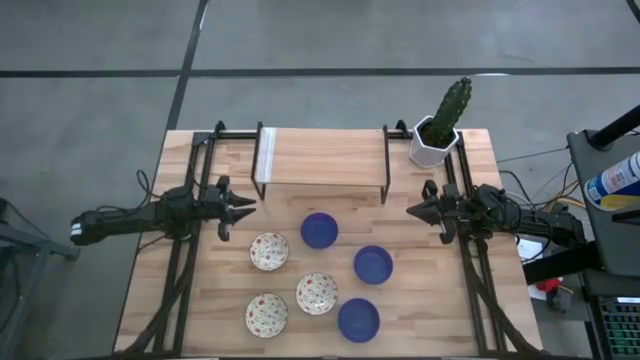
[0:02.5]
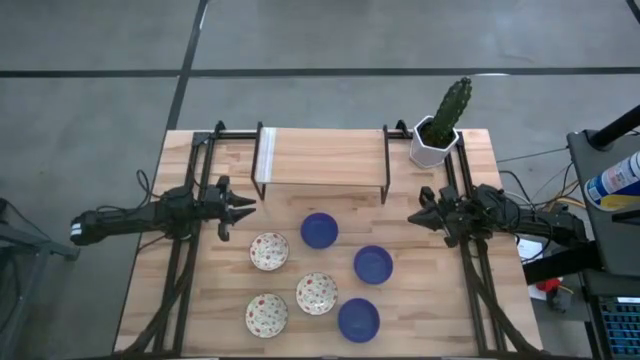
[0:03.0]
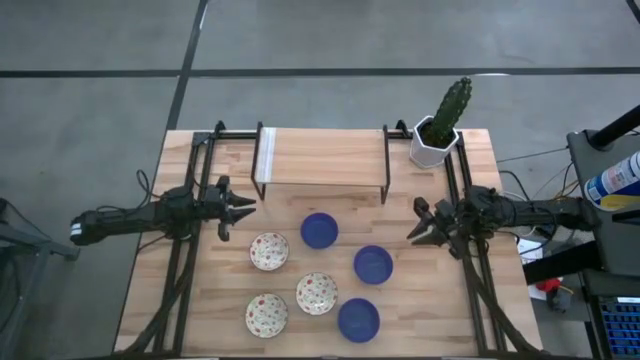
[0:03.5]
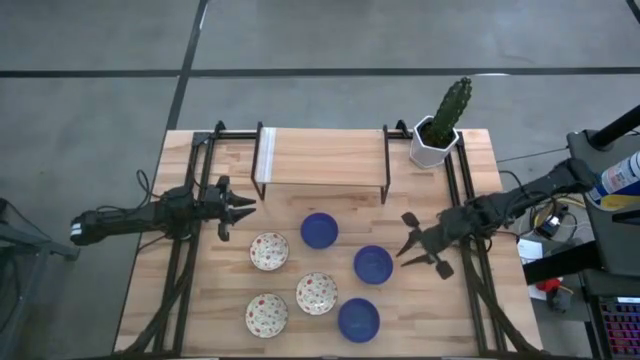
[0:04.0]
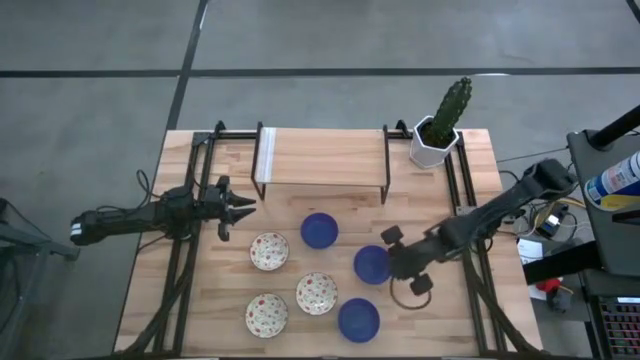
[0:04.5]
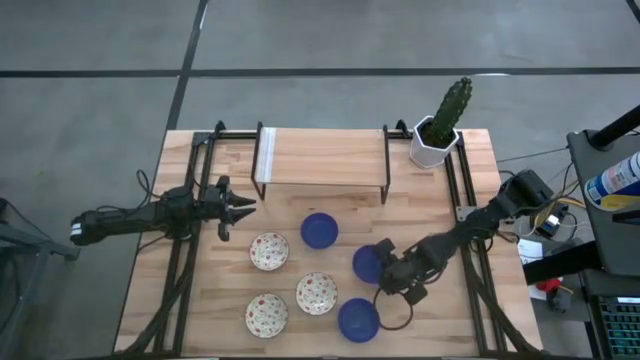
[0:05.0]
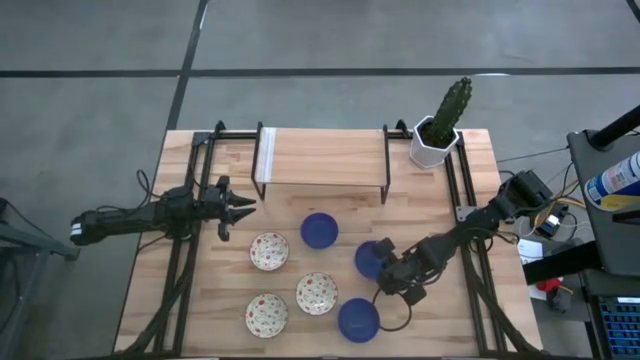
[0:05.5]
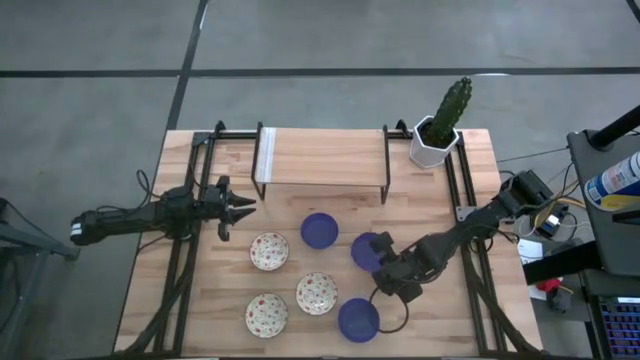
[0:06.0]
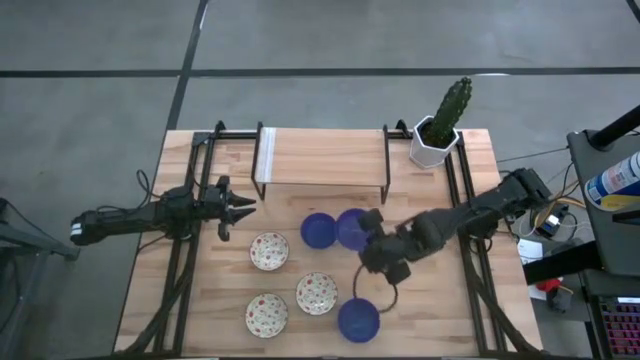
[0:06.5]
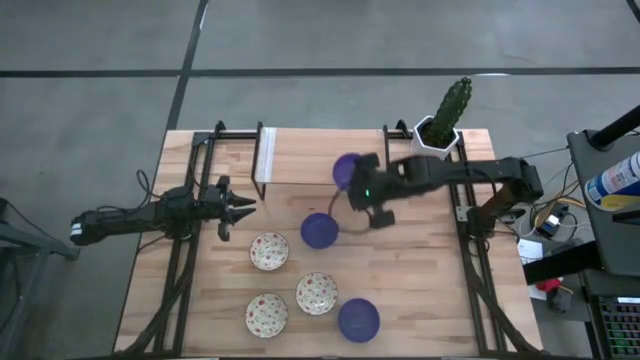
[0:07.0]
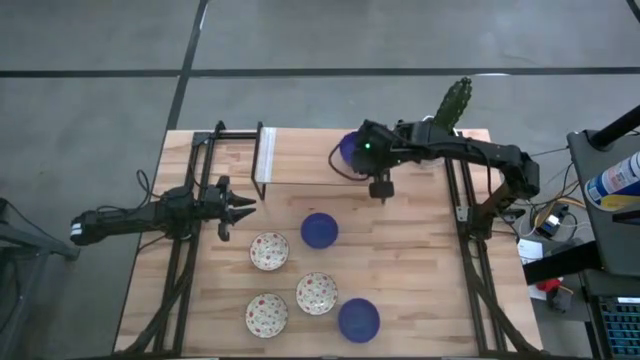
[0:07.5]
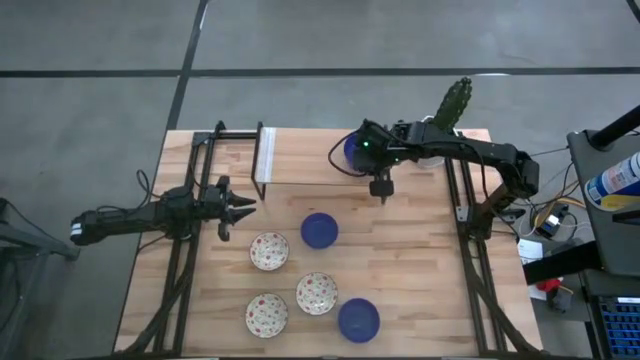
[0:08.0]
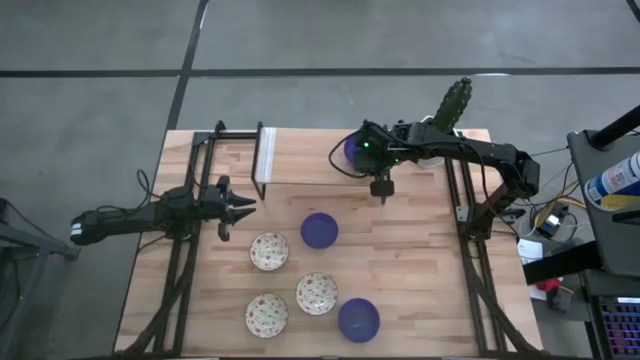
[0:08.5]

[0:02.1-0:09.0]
Task: Pick & Place Mini bowls
Put the middle violet bowl on the shelf

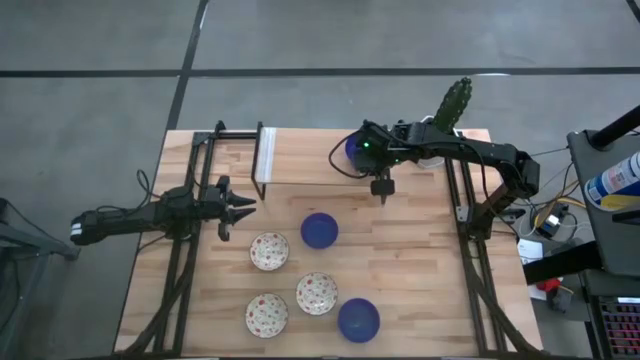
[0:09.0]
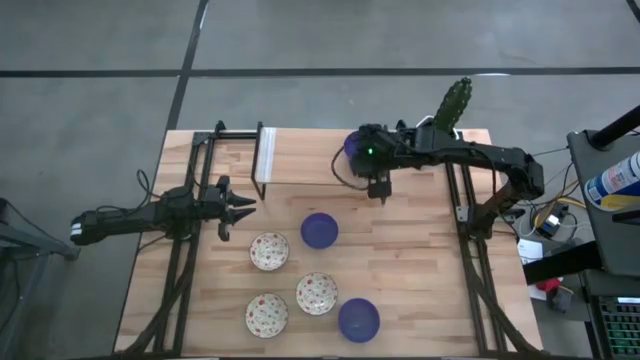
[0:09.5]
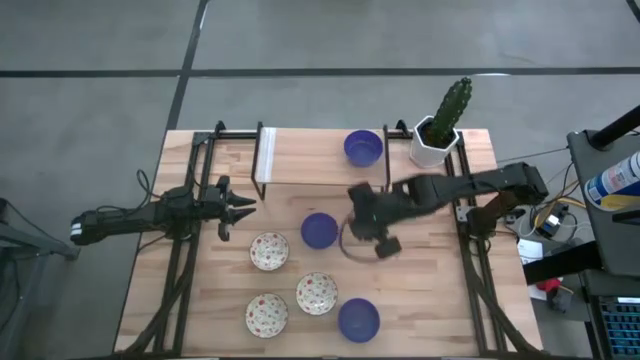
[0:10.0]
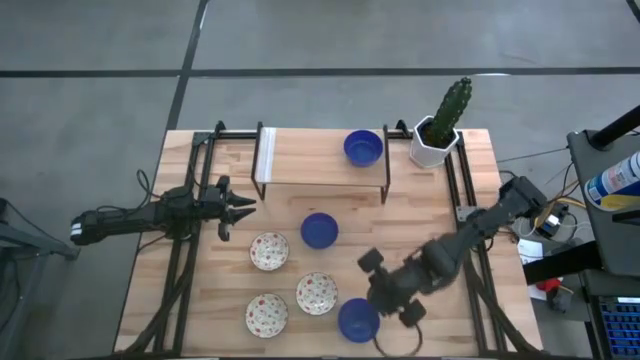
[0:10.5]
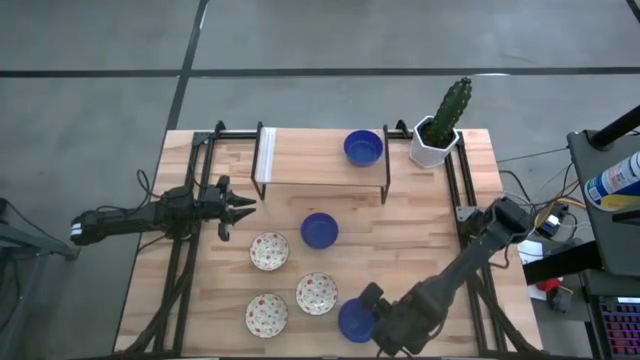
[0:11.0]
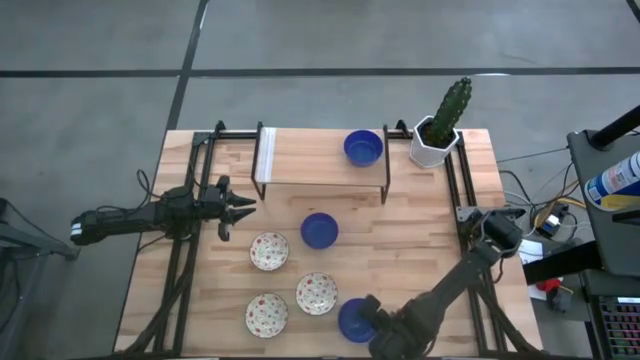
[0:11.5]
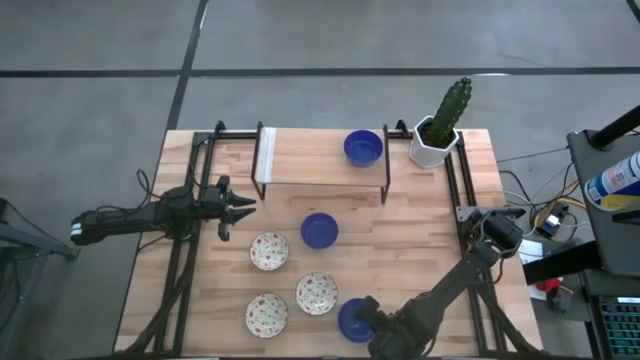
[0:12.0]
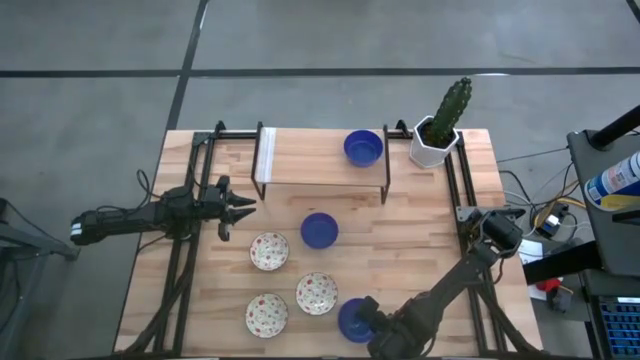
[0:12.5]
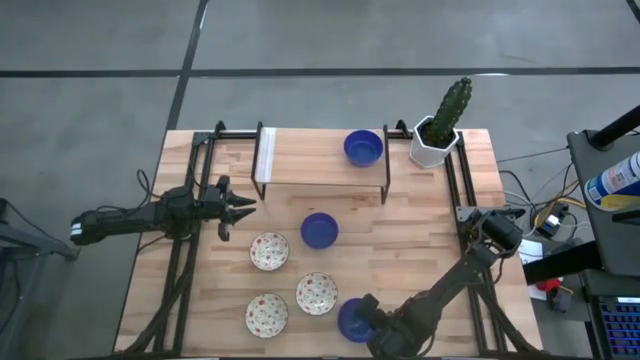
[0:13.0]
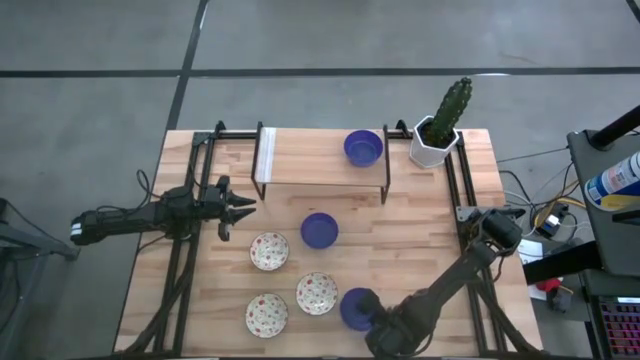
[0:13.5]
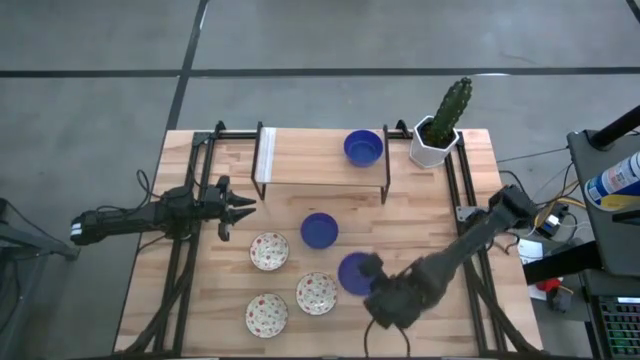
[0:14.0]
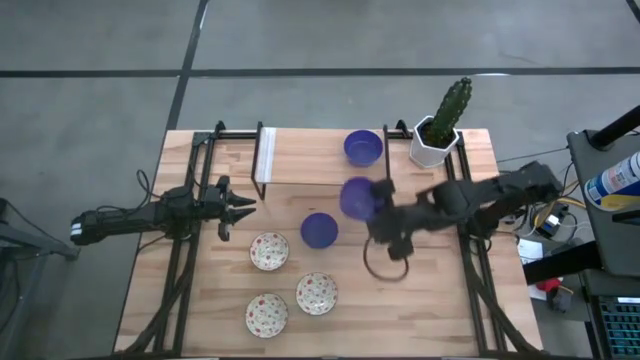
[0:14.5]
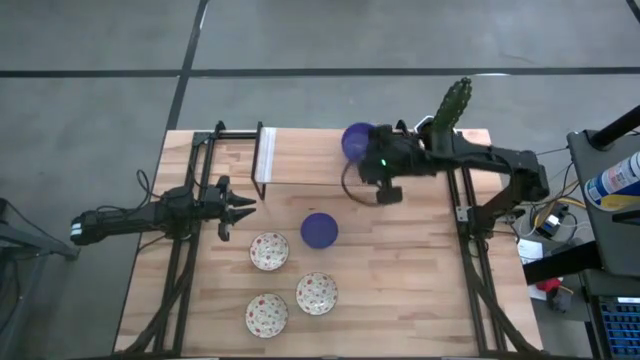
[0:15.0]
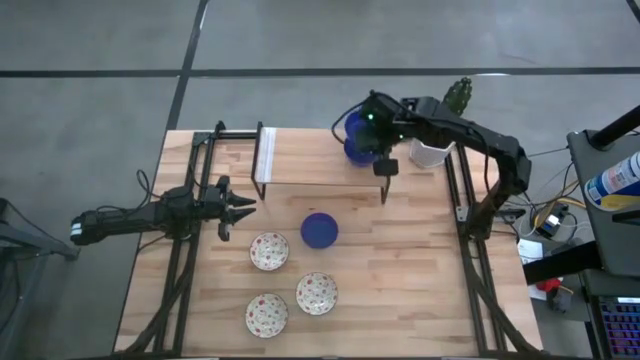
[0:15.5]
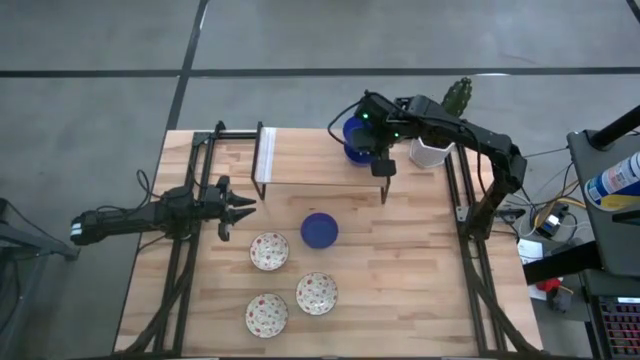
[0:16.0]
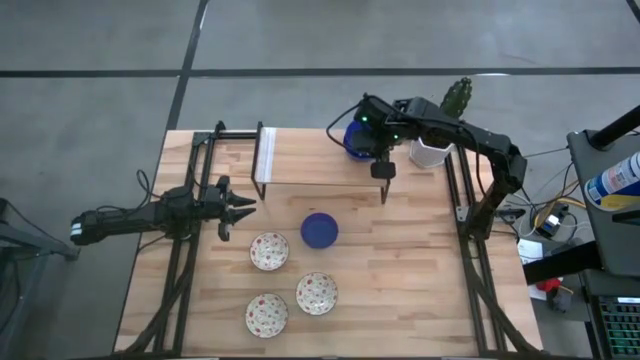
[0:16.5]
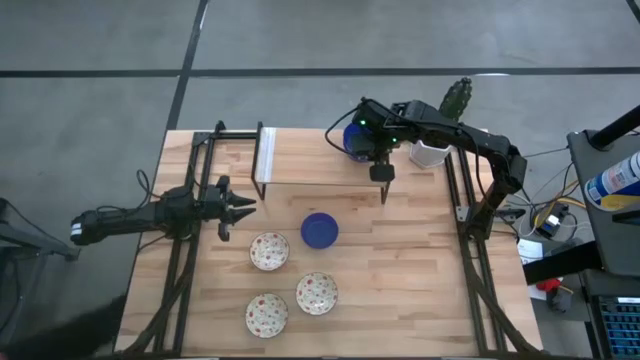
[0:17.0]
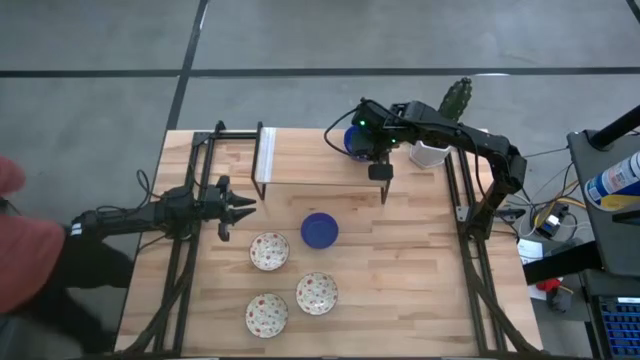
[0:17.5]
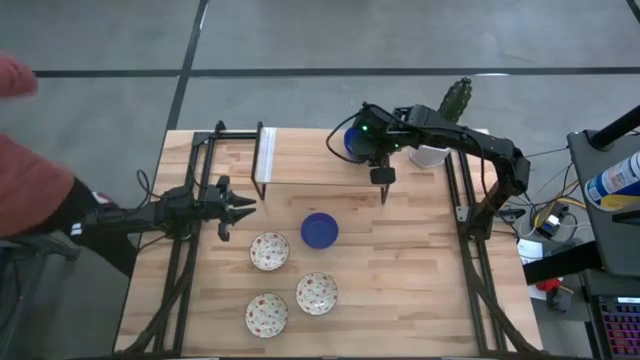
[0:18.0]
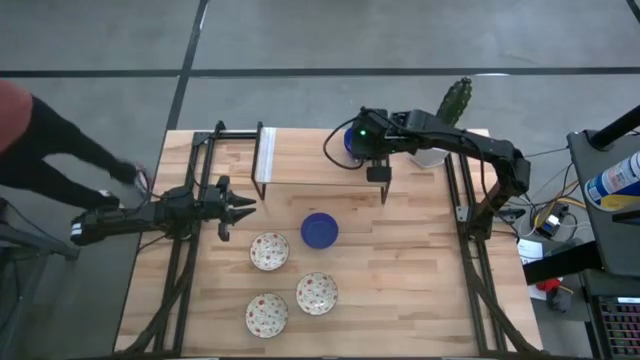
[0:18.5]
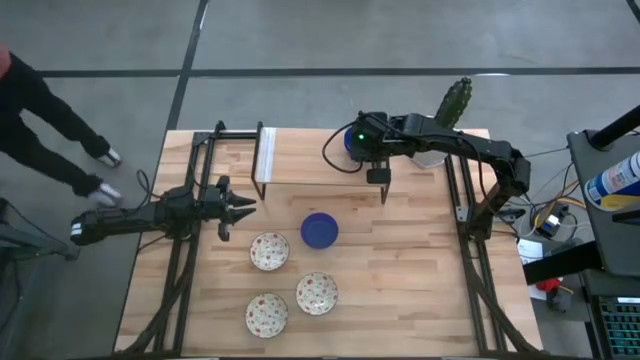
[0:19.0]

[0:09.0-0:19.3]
Stack the bottom violet bowl on top of the violet bowl on the shelf

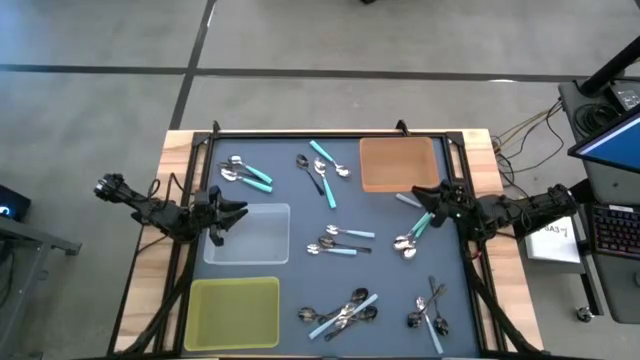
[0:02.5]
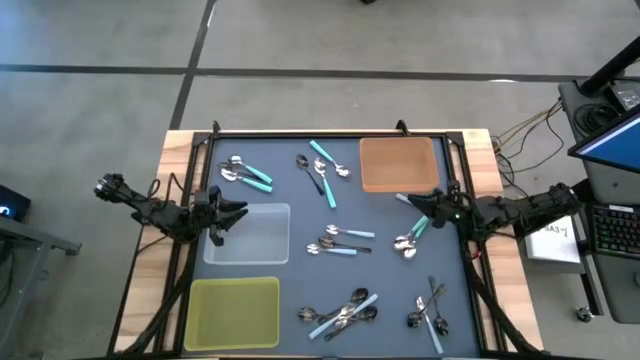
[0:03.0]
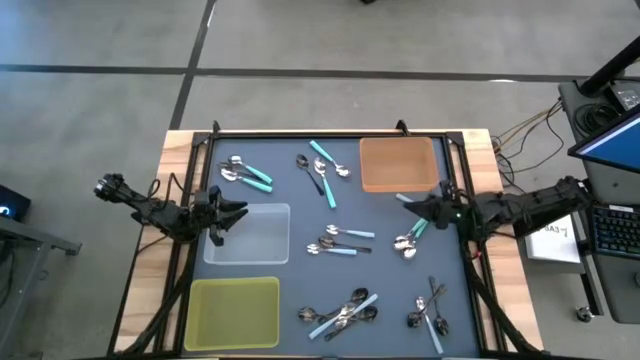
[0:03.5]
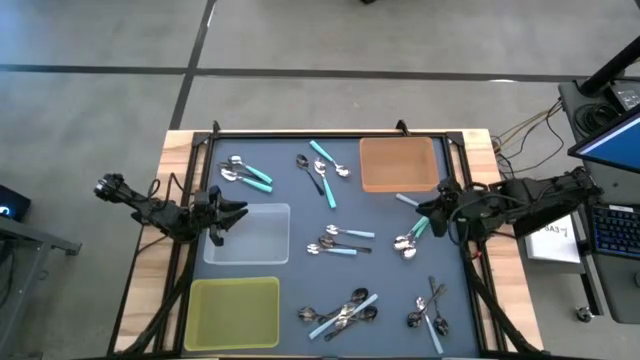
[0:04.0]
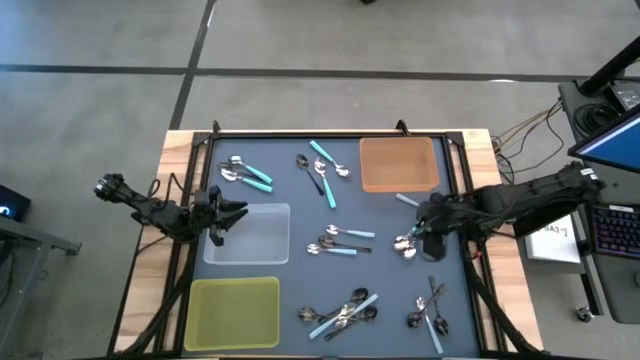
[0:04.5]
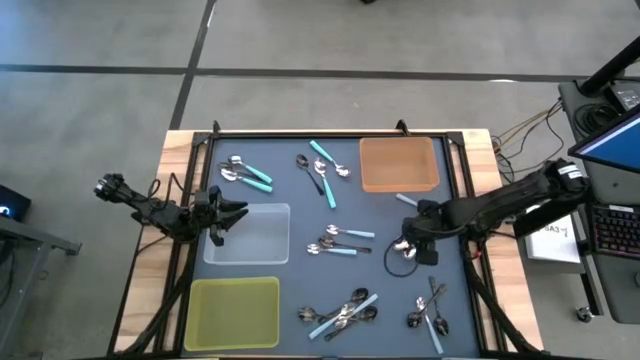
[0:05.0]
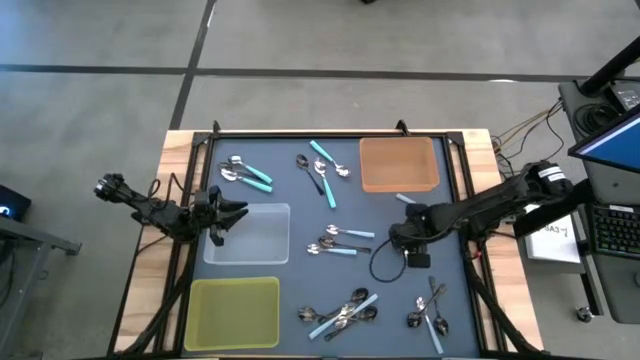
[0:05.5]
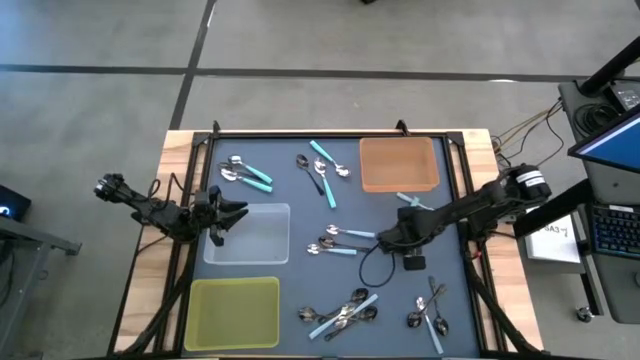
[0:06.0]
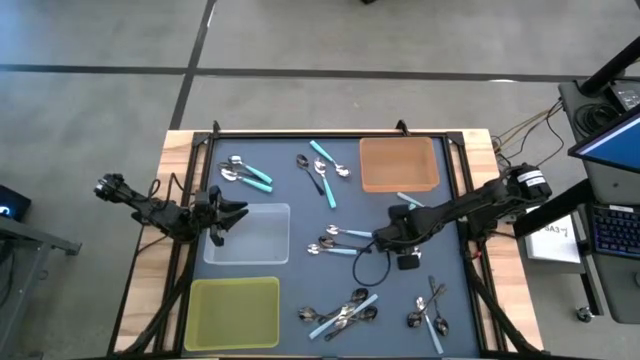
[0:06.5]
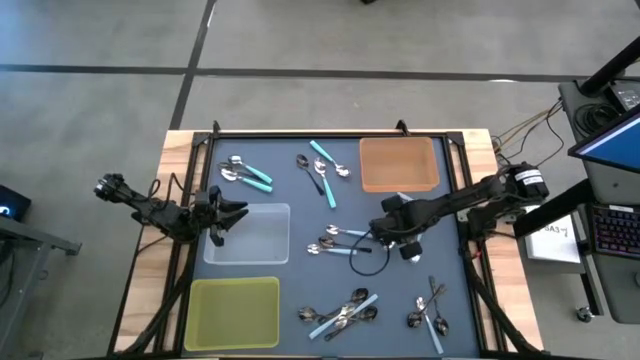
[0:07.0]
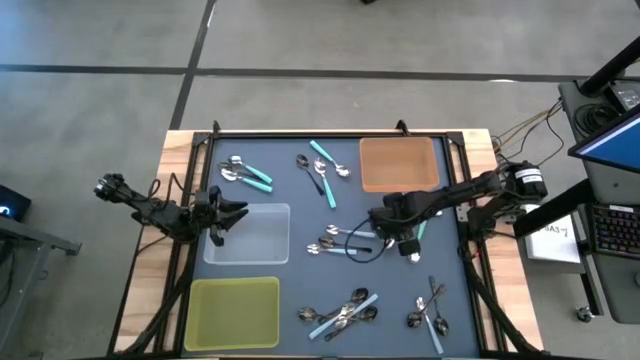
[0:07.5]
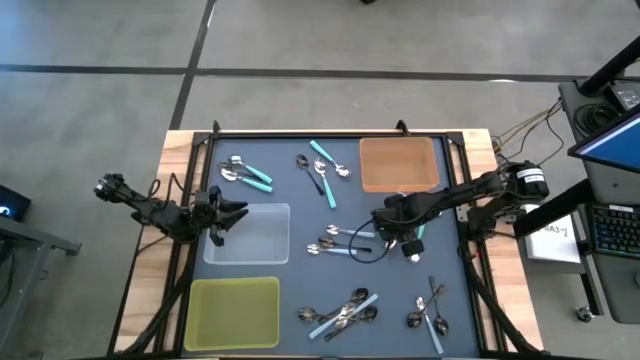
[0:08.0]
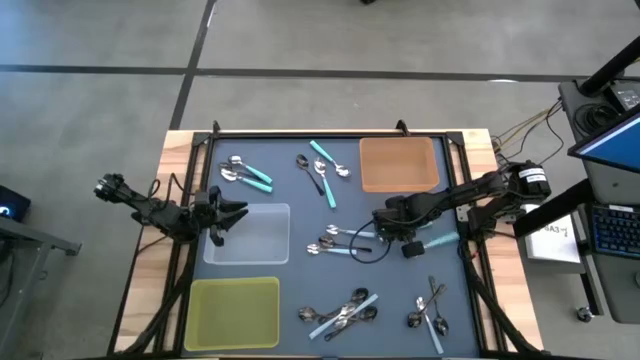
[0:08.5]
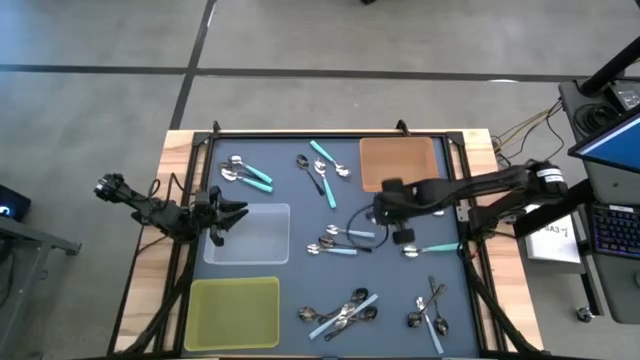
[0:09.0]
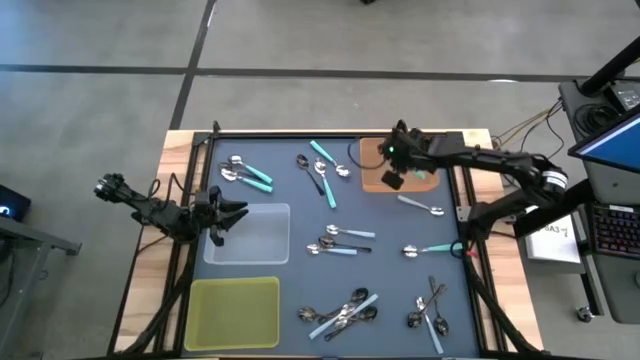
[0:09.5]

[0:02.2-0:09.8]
Task: Sort silverware by color (type)
Put the green spoon into the orange bin
